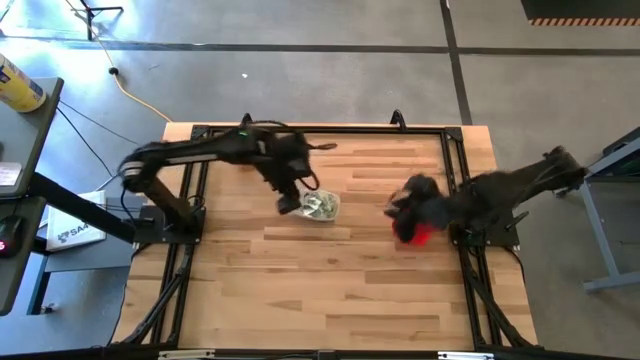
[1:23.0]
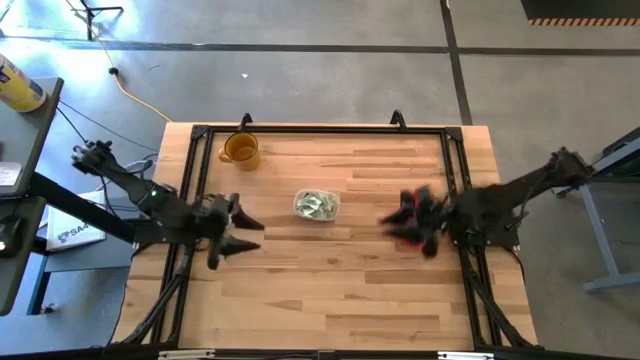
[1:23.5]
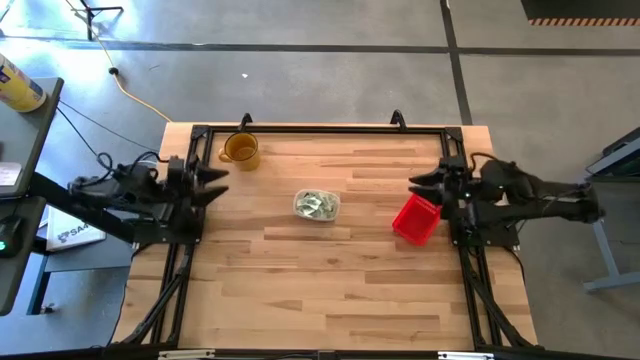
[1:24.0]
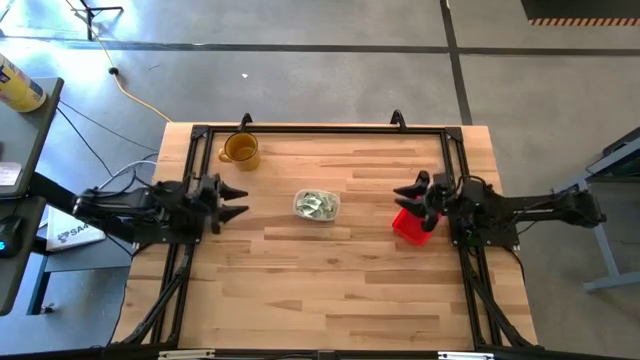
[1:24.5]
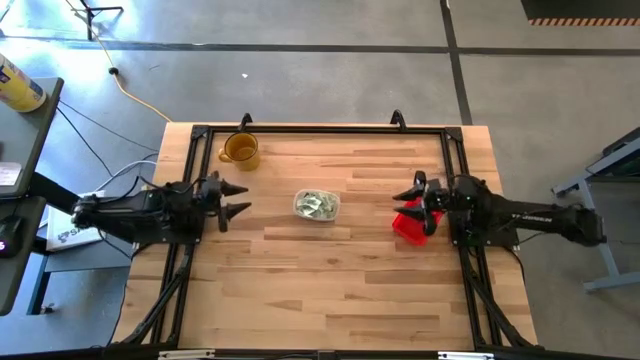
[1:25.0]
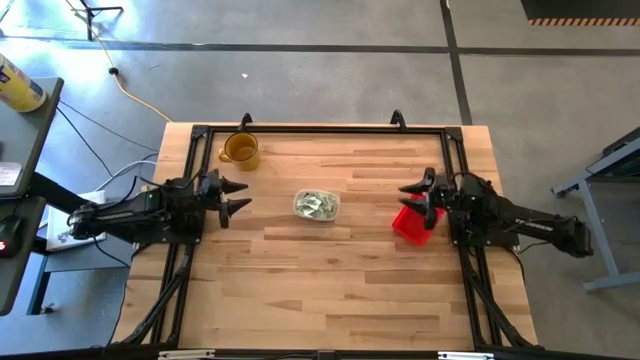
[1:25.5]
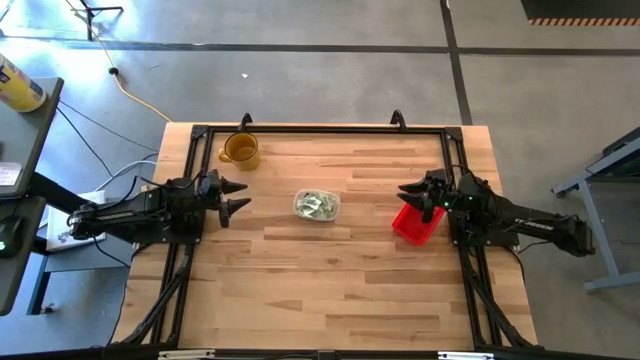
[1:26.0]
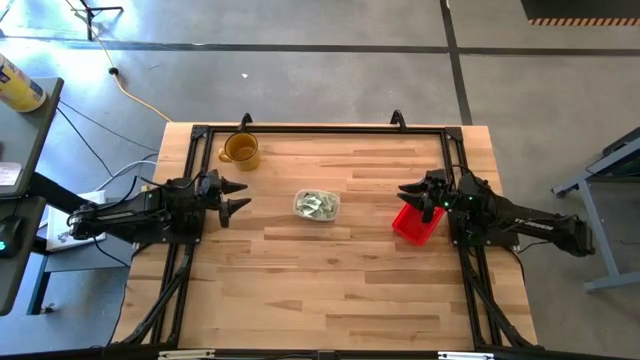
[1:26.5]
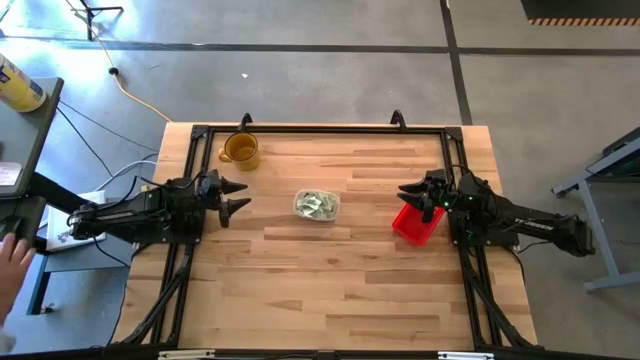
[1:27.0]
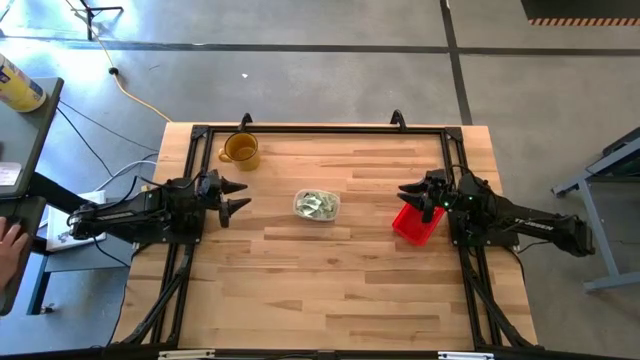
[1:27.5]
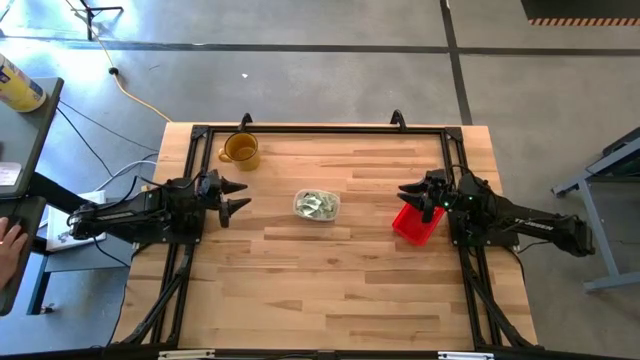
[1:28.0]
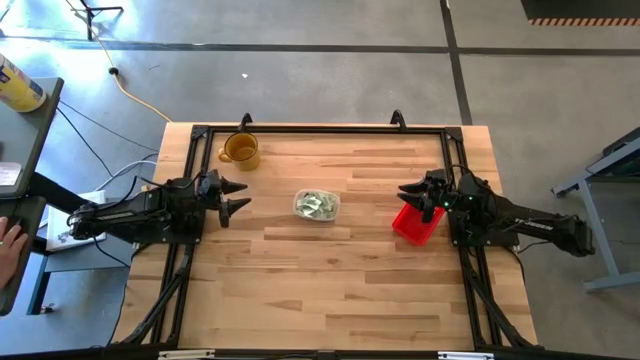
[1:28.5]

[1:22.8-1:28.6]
Task: Pick and place items into bin
Return to Home Position

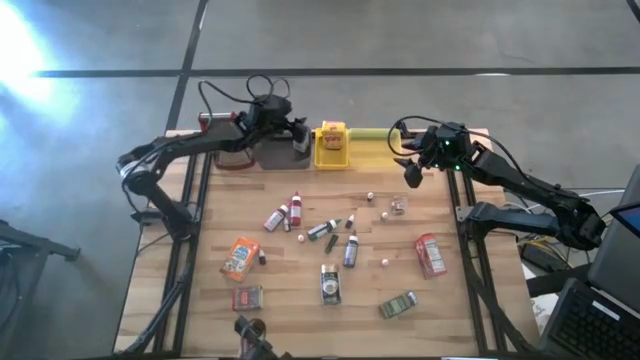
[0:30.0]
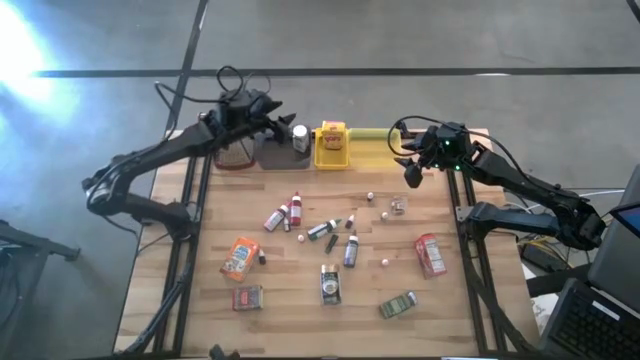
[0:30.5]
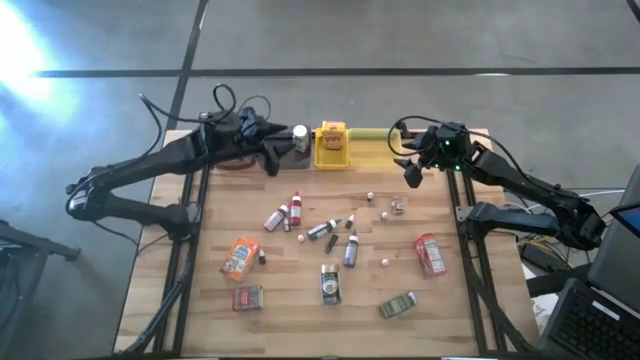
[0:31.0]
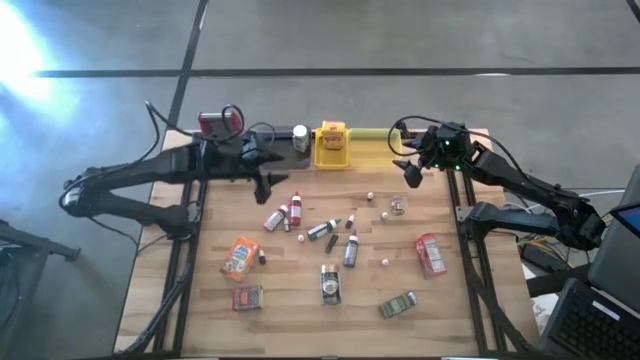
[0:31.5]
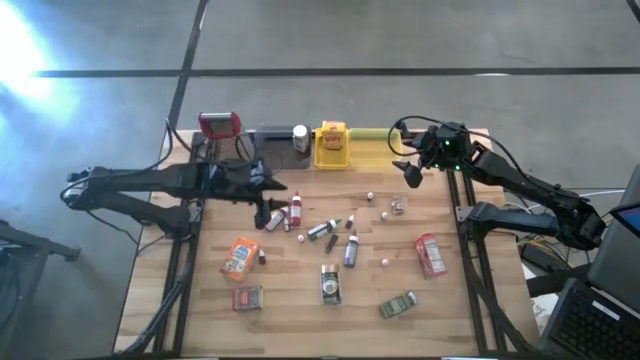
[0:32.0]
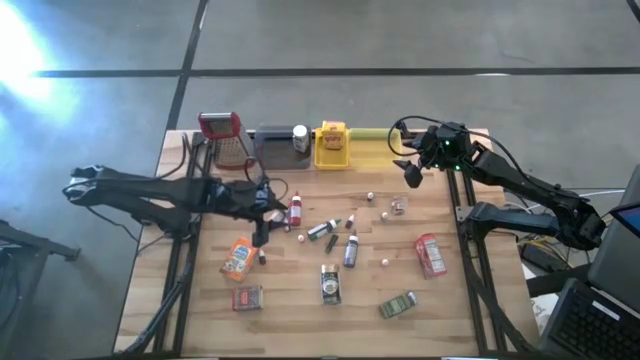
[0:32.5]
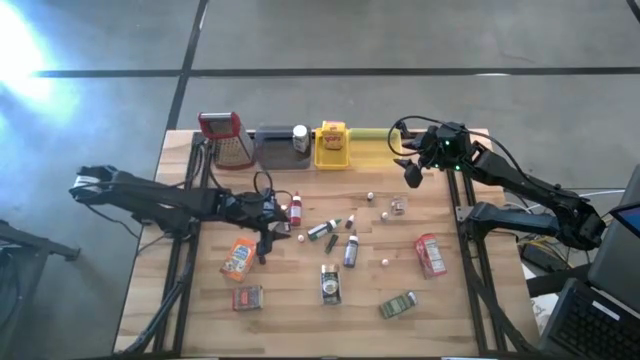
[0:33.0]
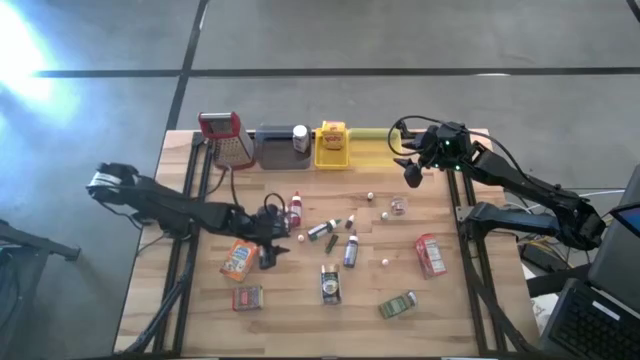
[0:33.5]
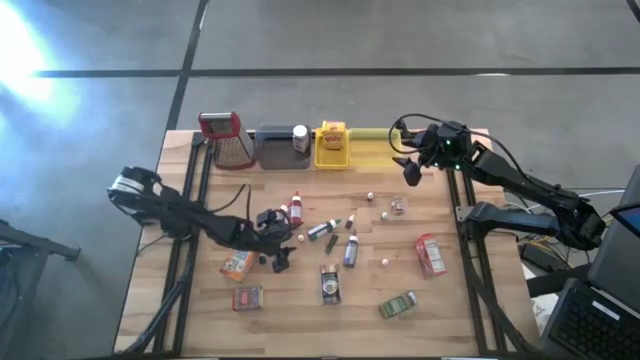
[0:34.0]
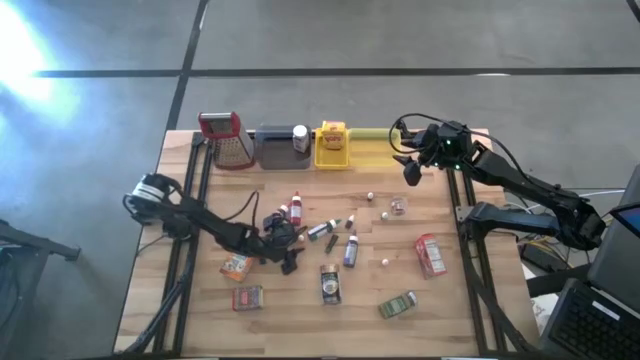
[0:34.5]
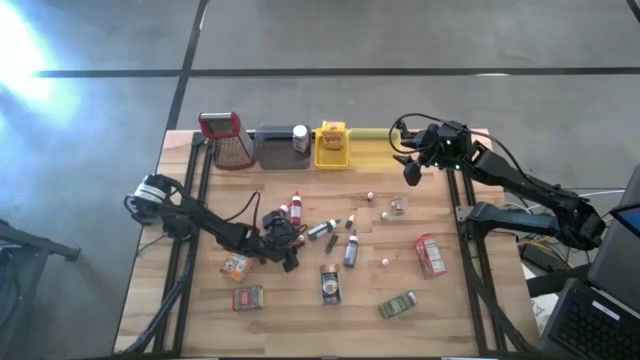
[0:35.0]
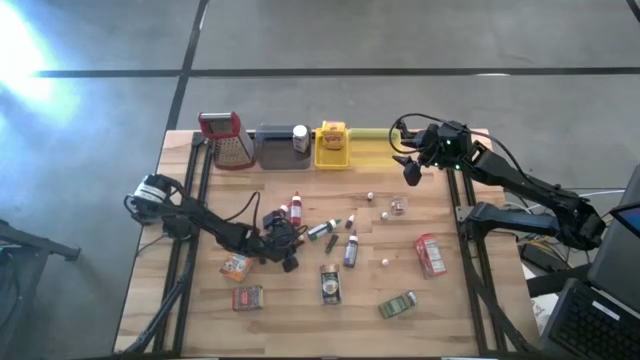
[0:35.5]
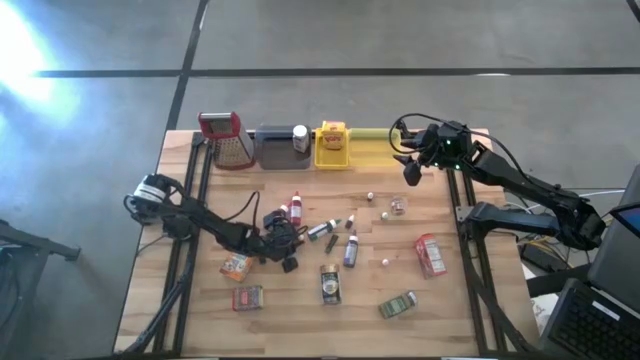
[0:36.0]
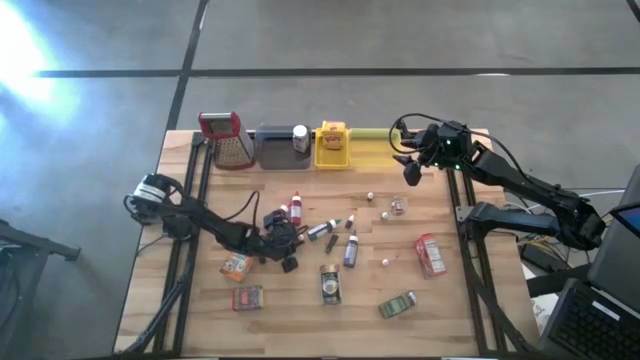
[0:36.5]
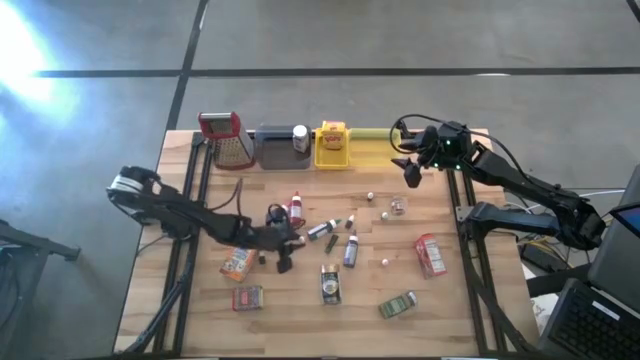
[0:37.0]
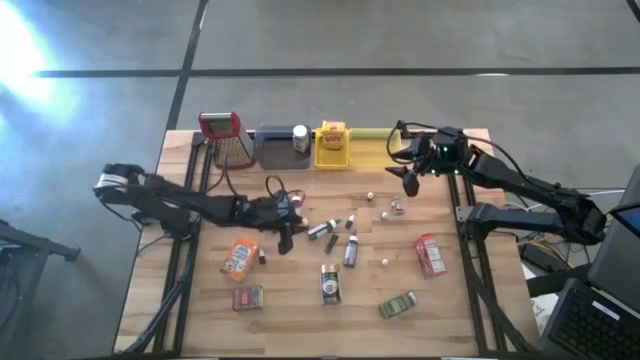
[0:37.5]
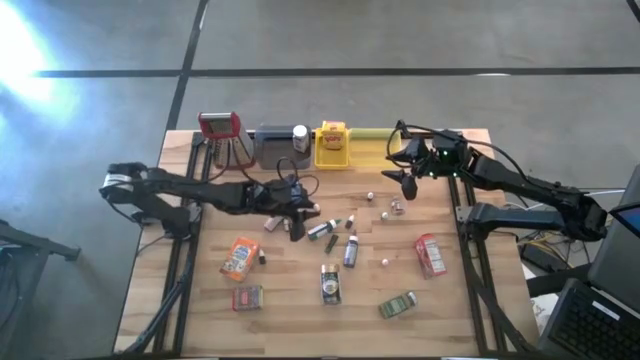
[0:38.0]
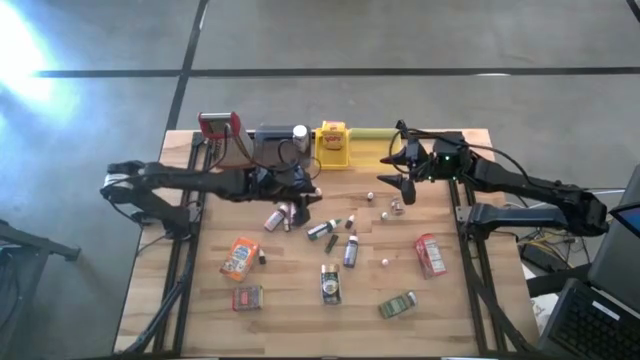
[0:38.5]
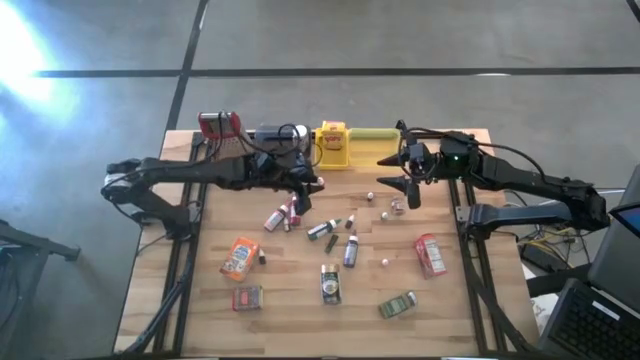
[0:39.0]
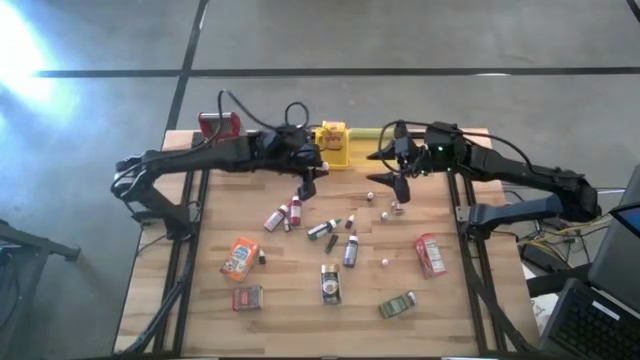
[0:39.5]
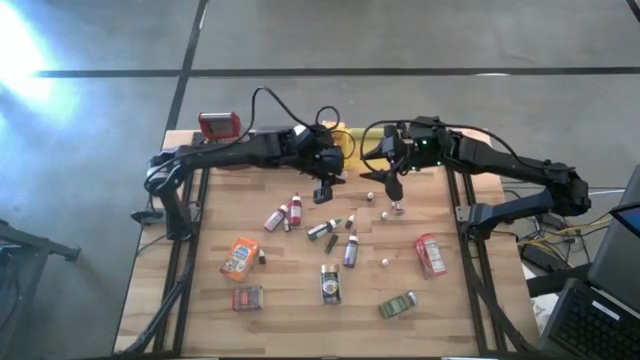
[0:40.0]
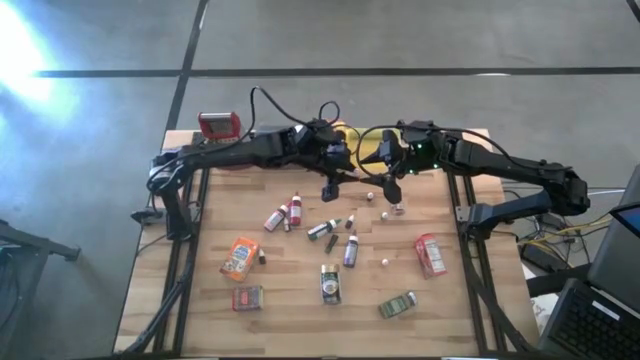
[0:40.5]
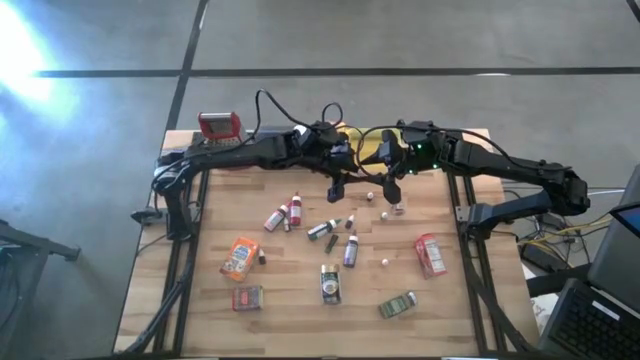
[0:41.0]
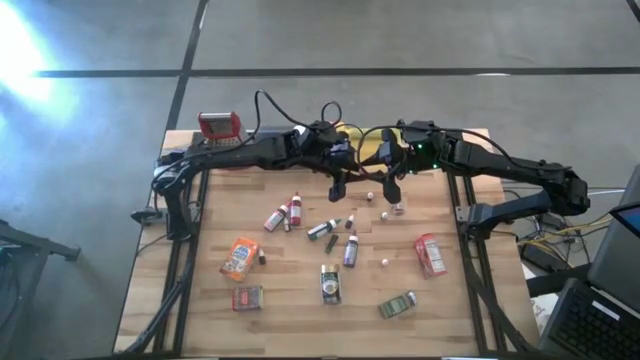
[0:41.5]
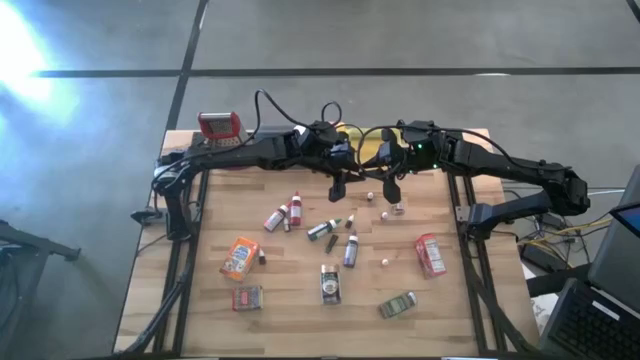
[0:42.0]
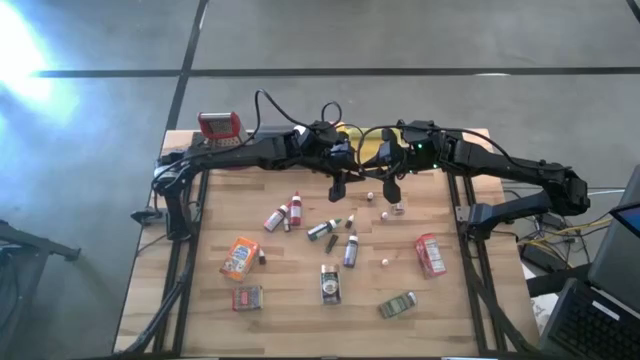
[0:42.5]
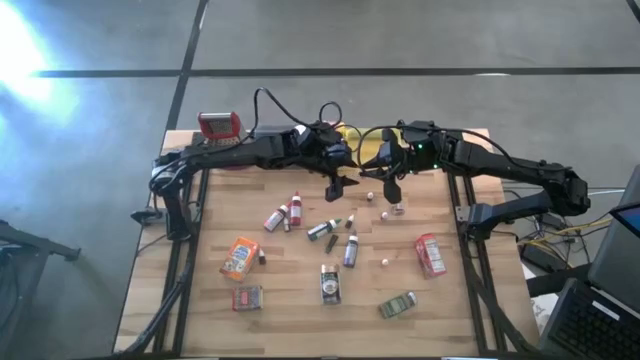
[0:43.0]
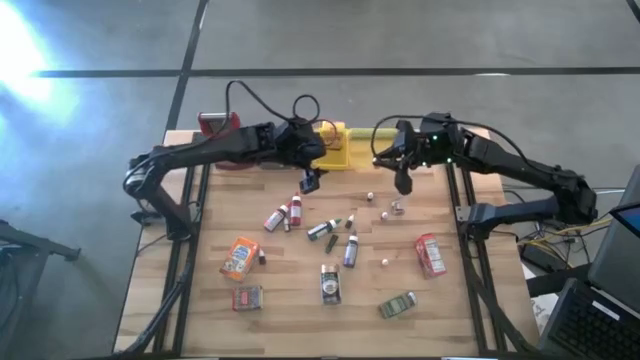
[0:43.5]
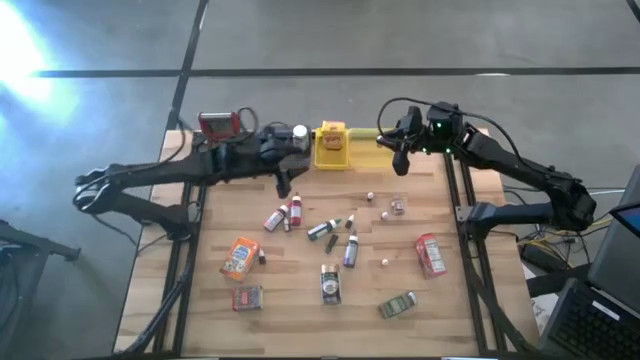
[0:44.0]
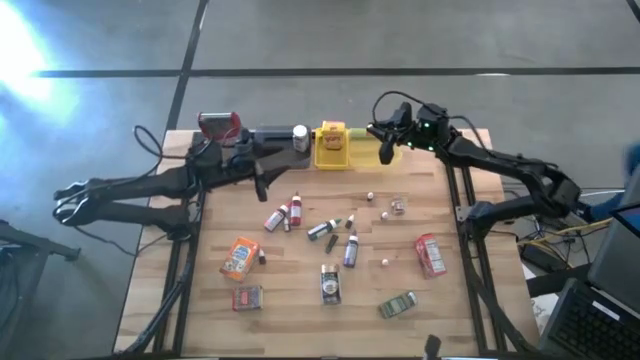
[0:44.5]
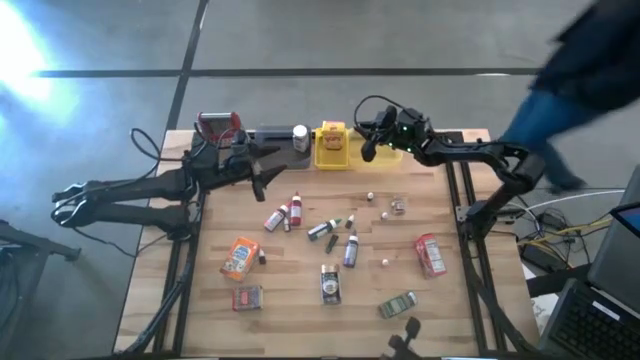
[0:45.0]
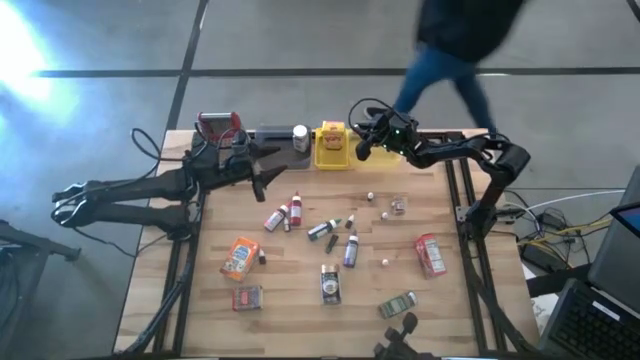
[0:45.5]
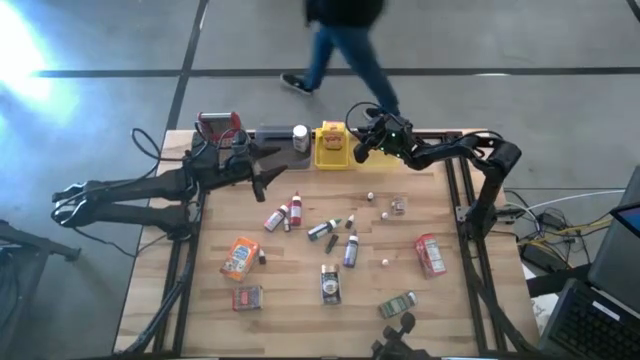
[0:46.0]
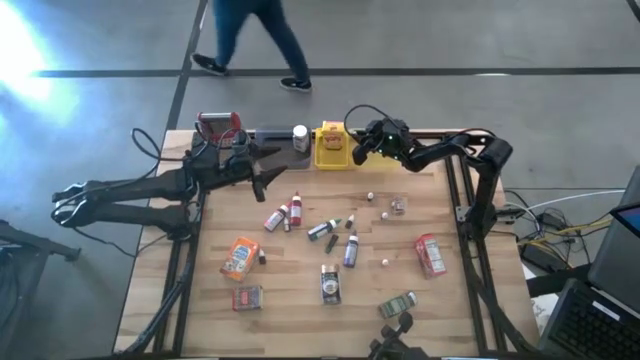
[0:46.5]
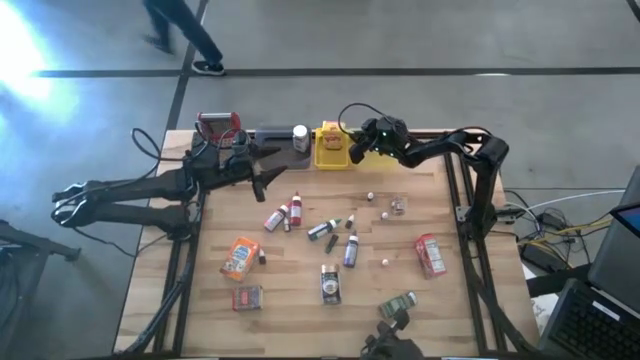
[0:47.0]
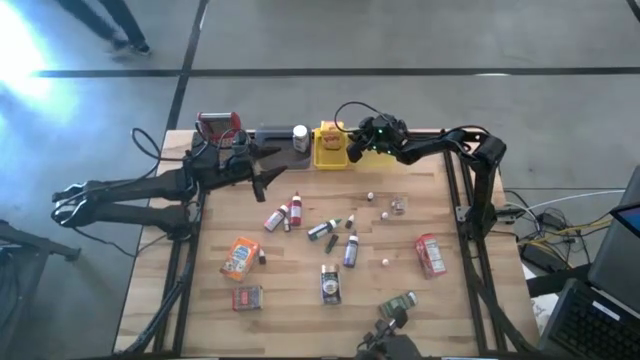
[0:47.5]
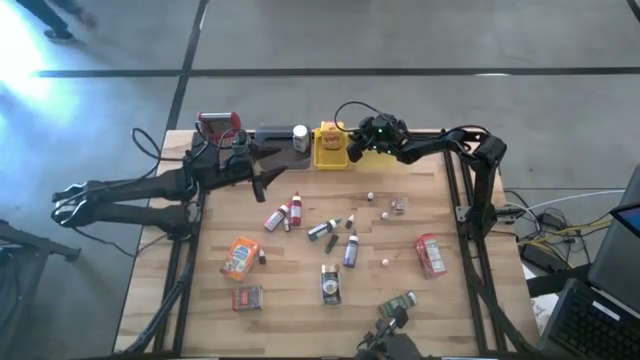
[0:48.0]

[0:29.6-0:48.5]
Task: Pick & Place Kitchen Items
Put the orange food coloring bottle into the light yellow bin
